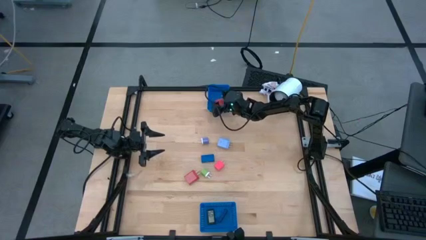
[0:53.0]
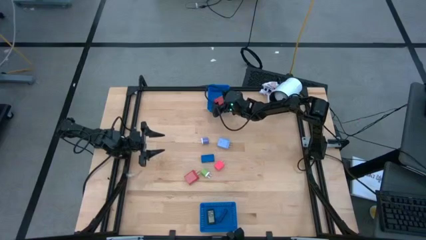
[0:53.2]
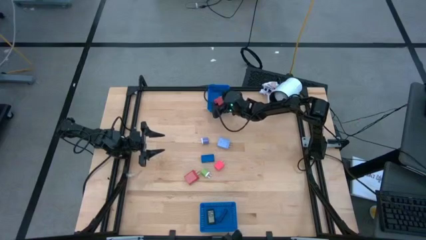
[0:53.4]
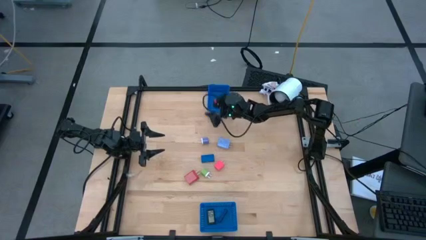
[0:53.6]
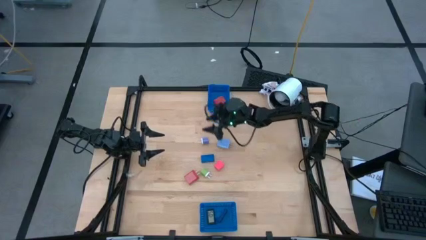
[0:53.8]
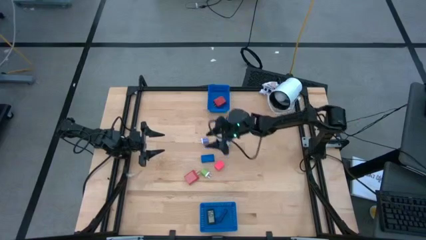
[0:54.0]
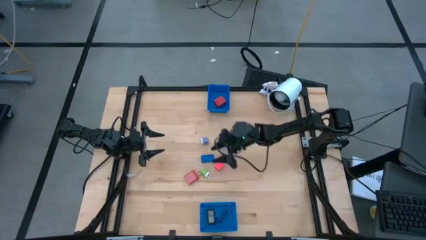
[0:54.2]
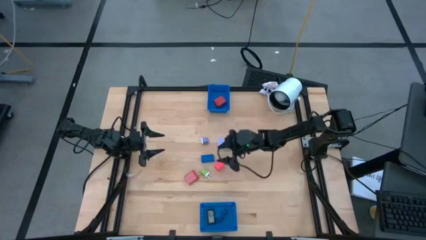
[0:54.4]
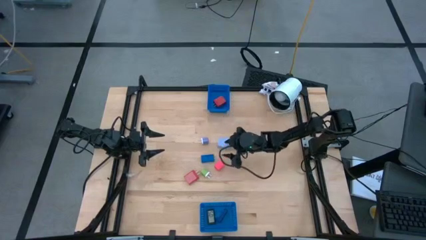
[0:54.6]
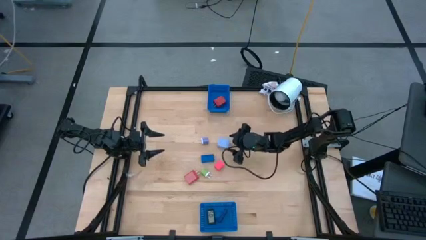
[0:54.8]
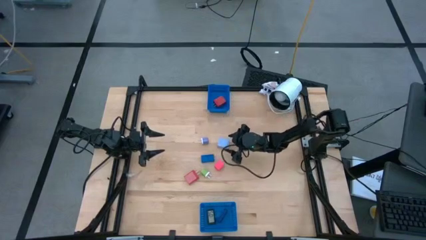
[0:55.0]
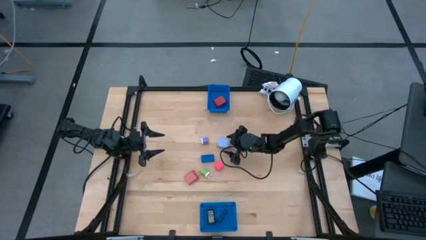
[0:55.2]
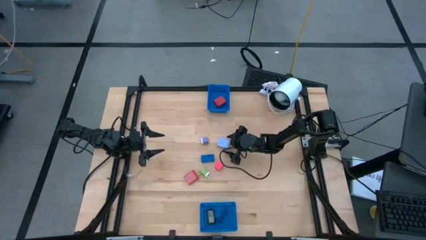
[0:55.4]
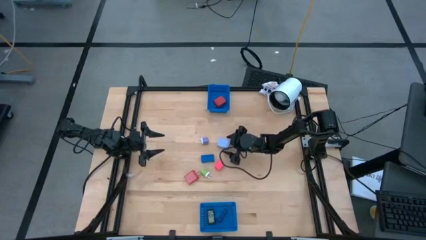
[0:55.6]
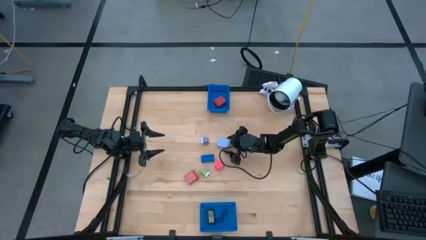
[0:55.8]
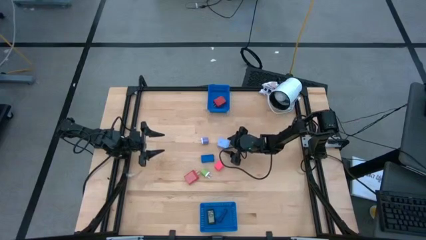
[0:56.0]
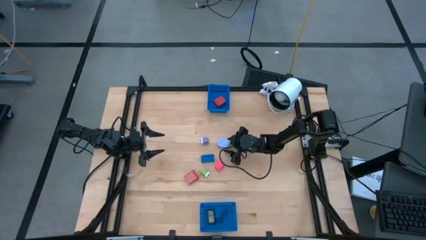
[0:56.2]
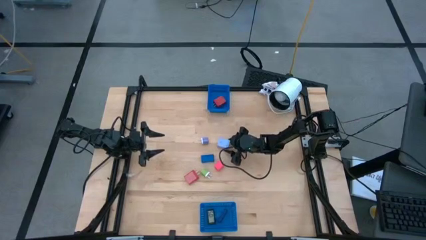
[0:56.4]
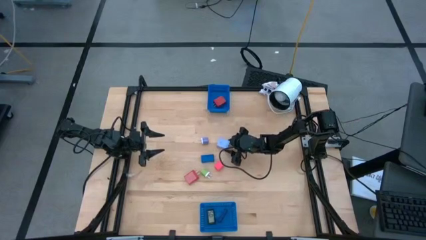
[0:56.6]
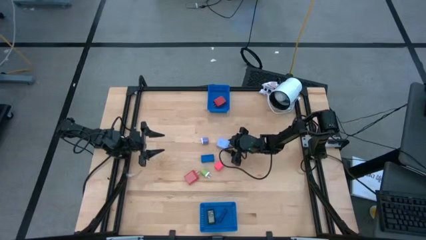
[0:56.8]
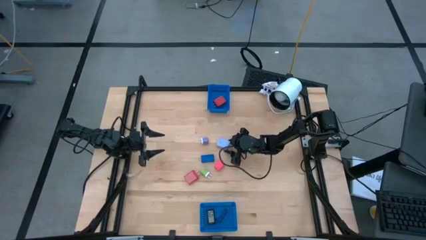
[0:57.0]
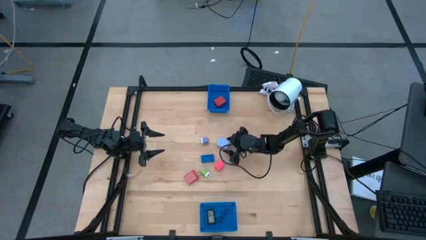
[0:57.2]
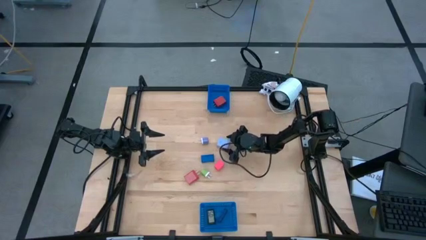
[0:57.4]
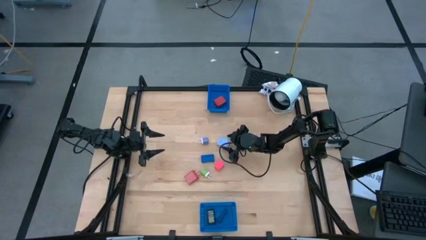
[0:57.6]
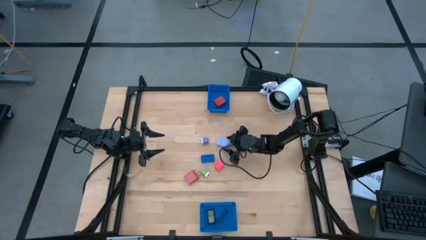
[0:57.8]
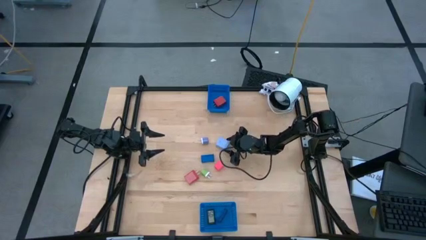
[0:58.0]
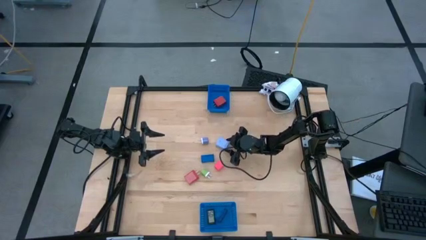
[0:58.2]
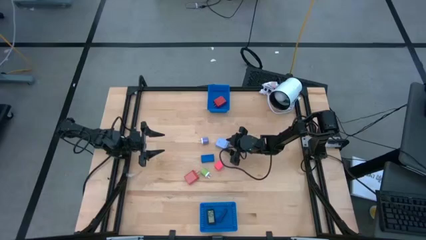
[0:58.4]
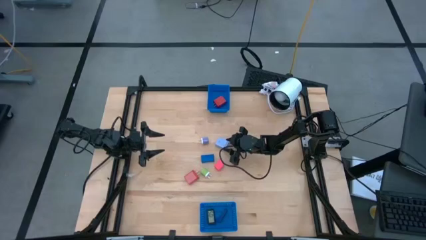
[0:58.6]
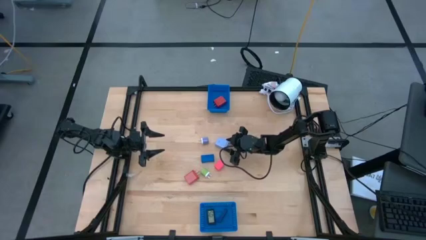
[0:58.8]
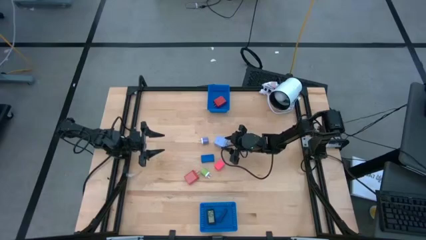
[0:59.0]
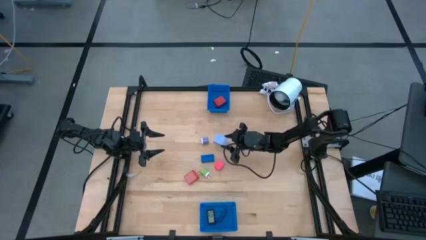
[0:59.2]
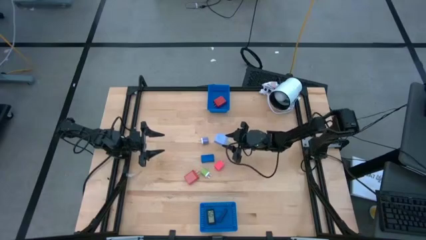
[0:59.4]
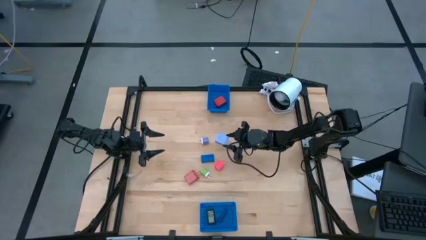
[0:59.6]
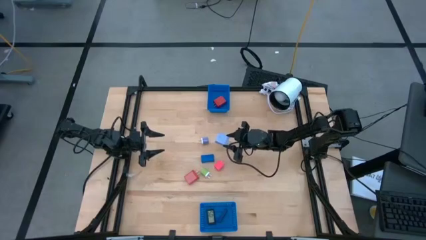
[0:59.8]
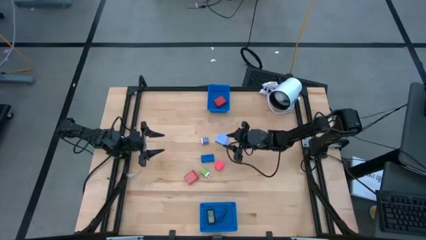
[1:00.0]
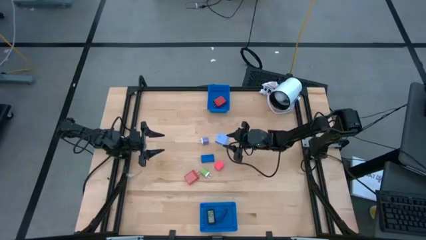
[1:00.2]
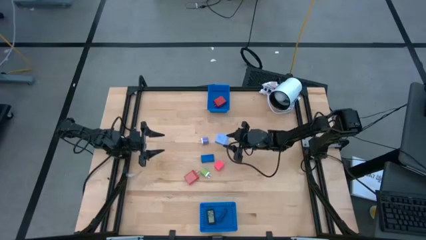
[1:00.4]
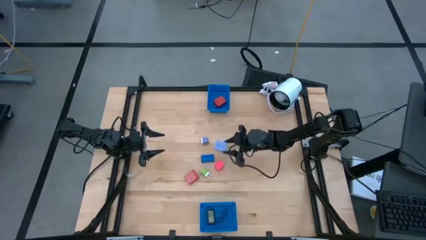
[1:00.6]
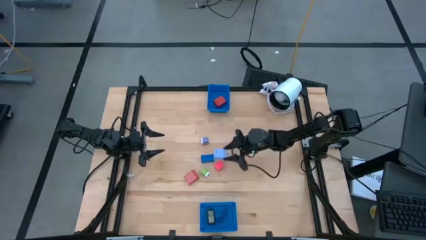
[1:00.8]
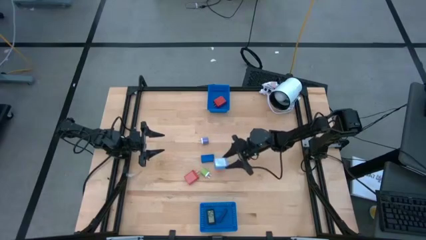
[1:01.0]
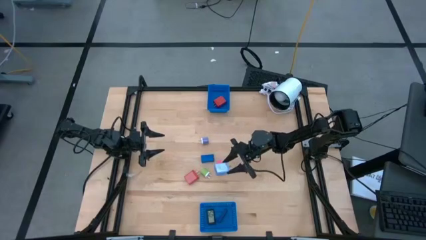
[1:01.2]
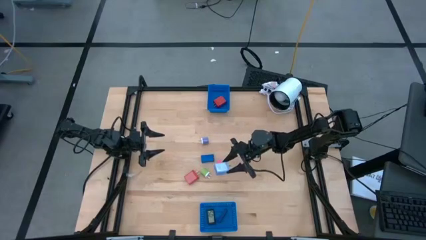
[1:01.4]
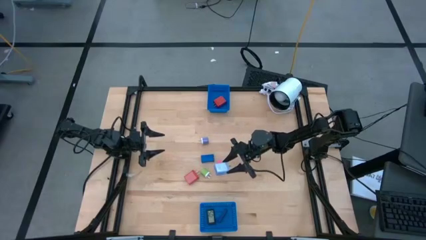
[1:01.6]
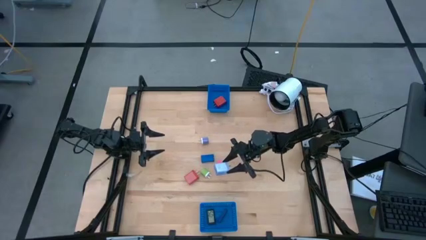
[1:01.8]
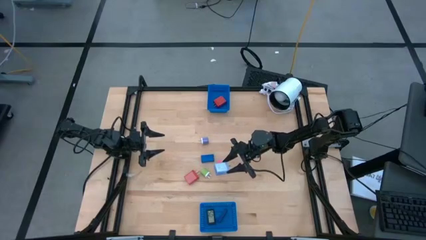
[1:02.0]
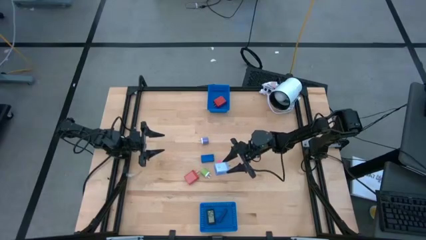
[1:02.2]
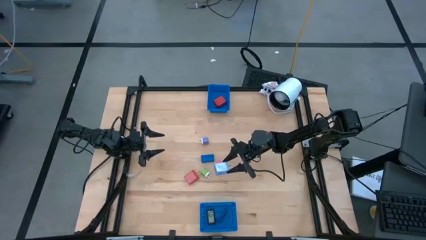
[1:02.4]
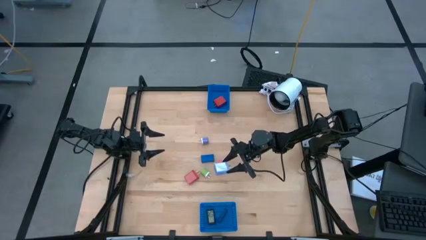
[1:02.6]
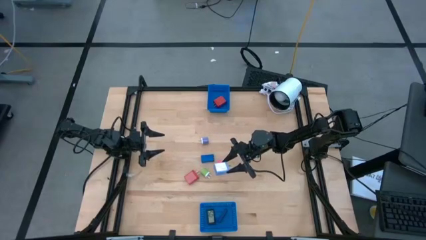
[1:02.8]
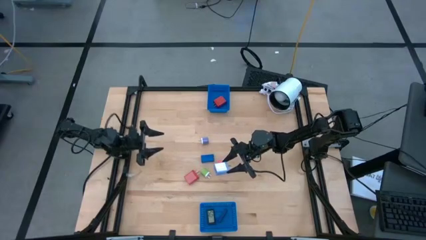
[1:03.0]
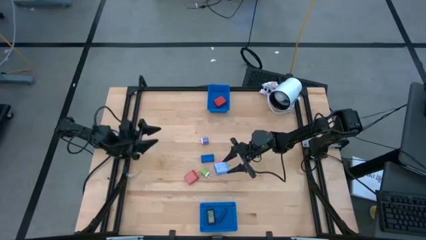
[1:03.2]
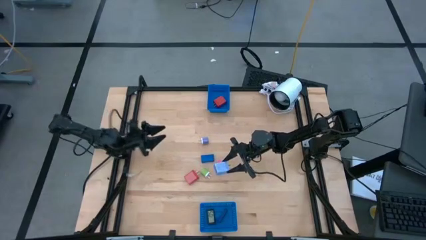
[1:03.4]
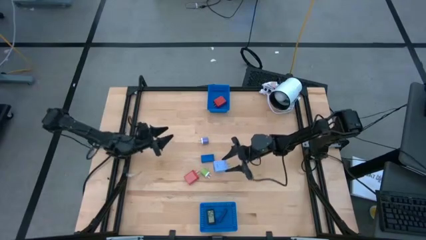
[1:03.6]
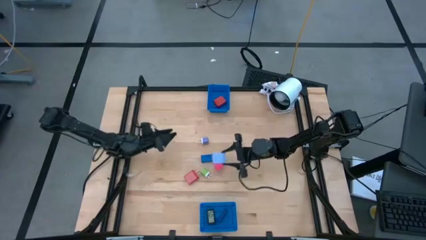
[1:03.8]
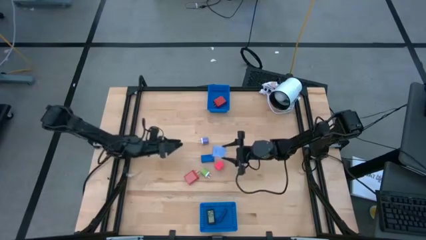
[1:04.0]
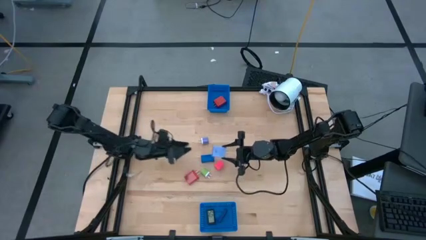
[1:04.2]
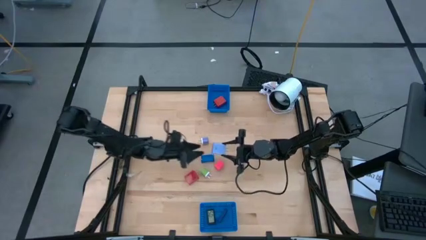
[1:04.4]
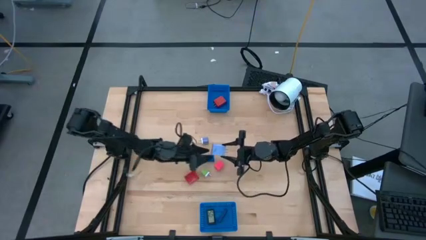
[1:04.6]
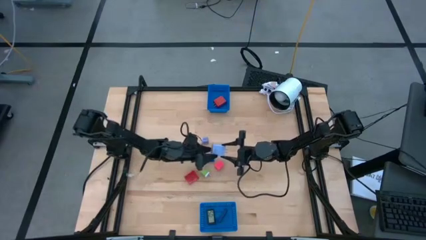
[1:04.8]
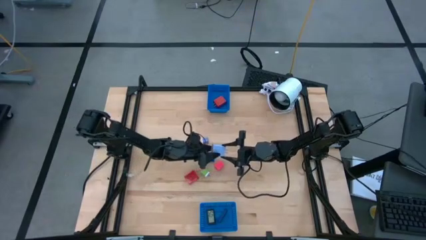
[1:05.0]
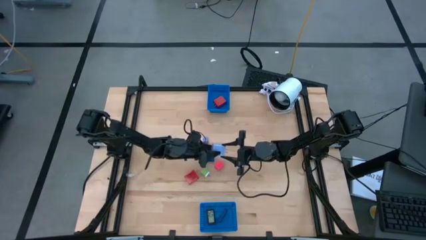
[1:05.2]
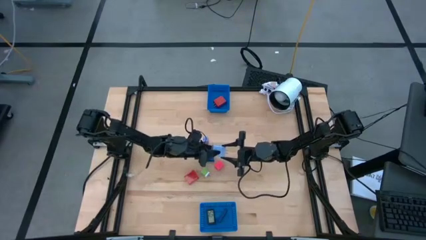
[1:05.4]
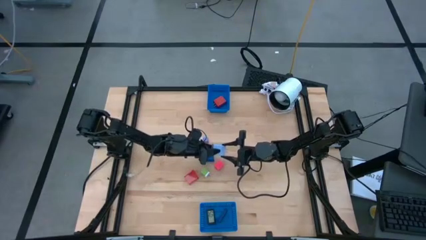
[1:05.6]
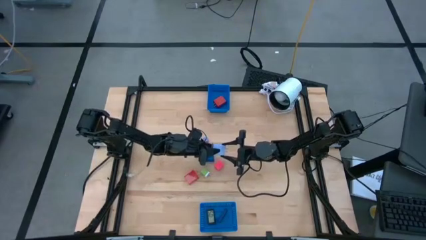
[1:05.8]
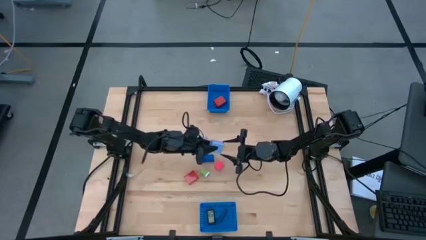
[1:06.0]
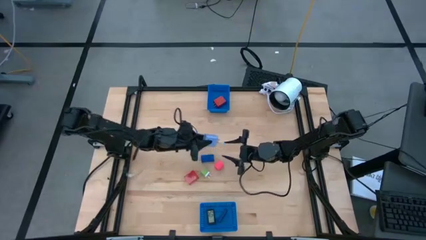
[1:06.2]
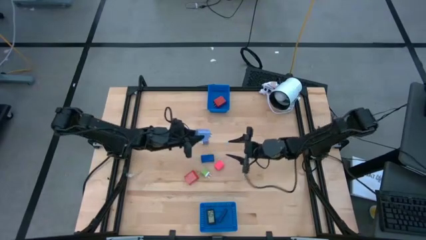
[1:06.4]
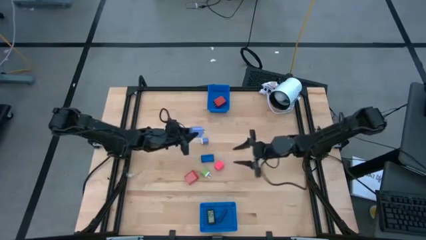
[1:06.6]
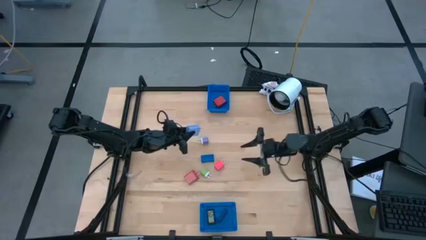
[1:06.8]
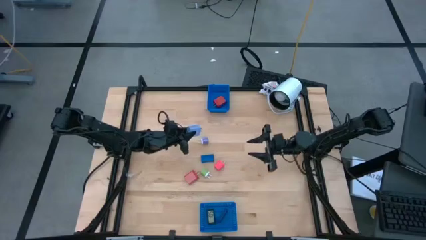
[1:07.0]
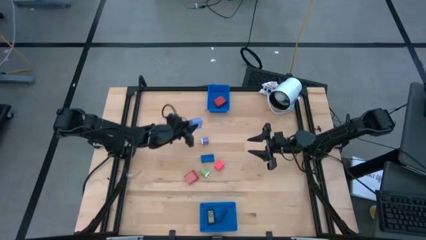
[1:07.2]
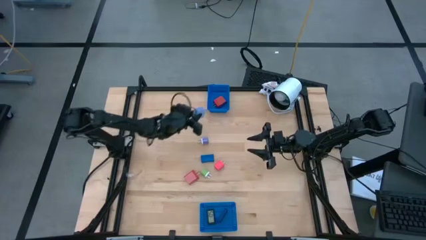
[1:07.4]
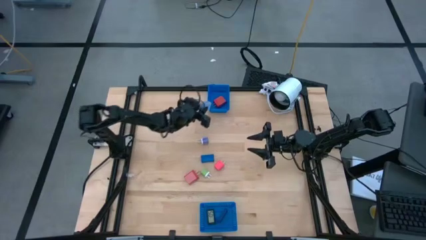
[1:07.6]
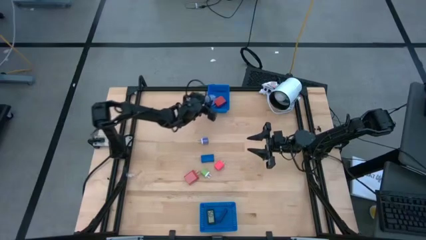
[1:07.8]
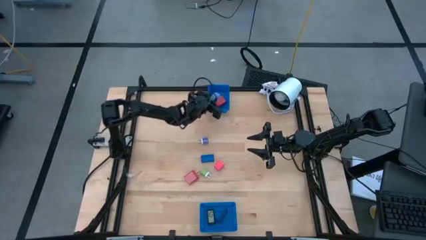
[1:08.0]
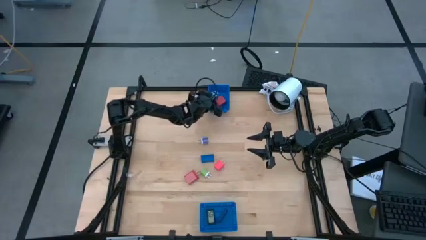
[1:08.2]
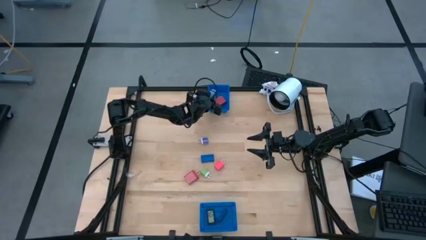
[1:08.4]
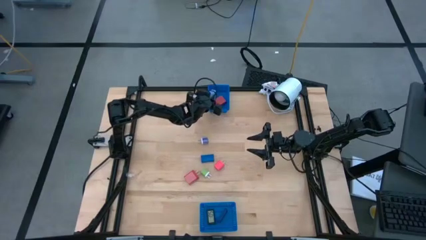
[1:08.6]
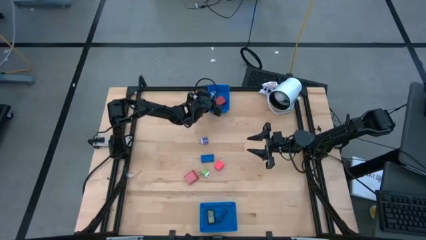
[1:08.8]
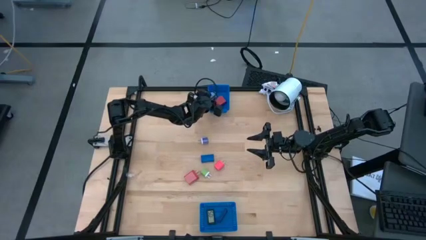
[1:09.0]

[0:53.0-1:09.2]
Task: Pick & Place Office items
Put the blue charger adapter into the top blue bin
